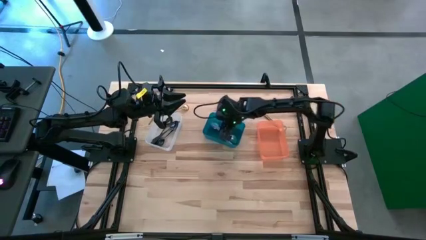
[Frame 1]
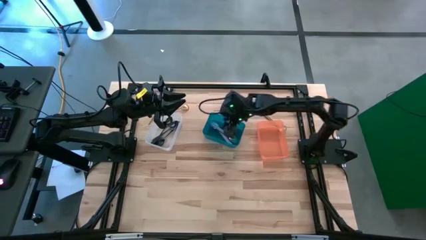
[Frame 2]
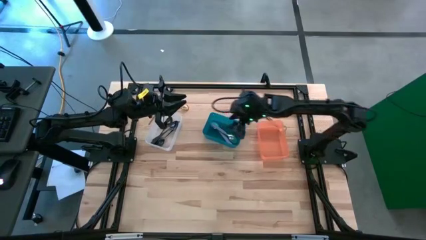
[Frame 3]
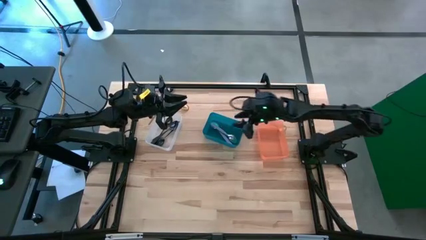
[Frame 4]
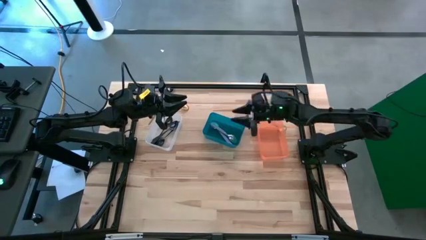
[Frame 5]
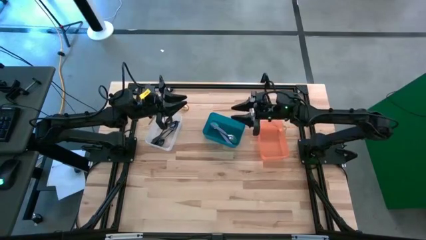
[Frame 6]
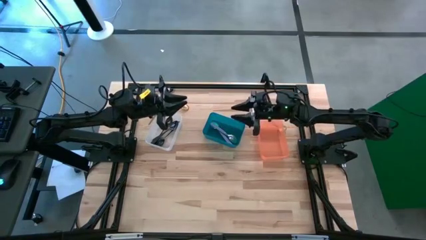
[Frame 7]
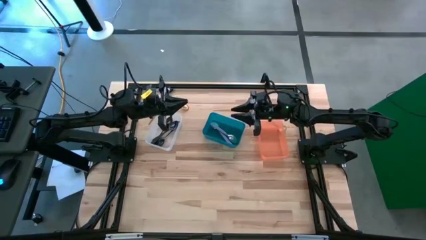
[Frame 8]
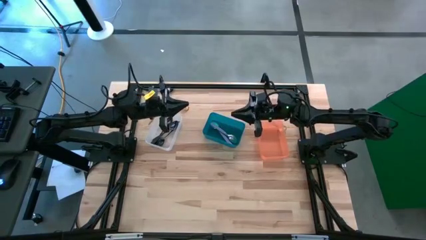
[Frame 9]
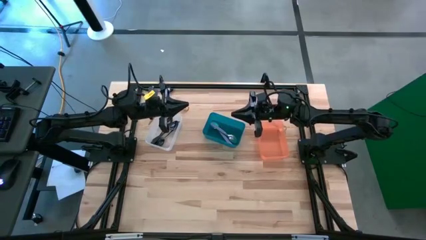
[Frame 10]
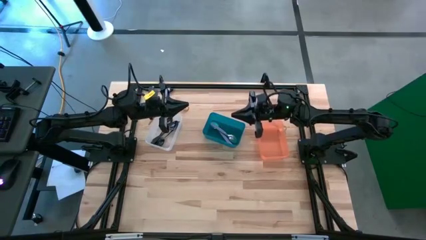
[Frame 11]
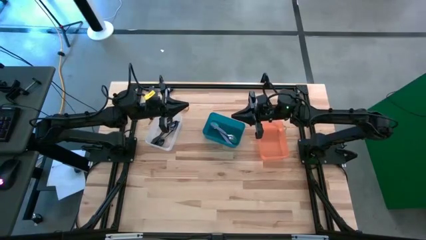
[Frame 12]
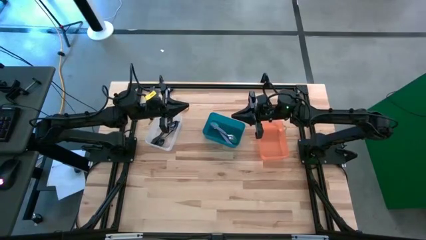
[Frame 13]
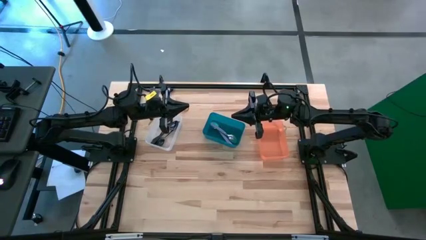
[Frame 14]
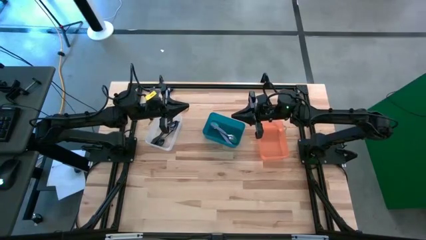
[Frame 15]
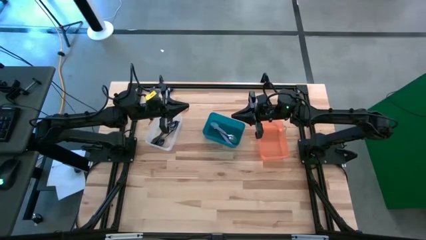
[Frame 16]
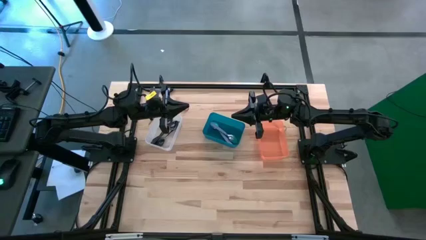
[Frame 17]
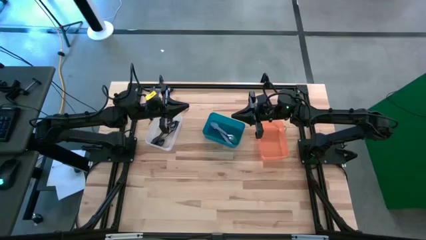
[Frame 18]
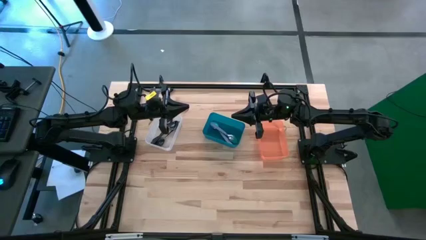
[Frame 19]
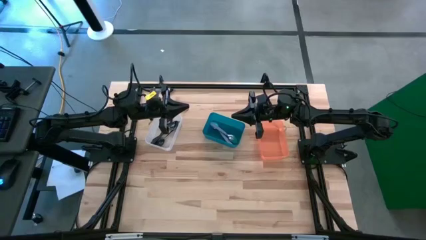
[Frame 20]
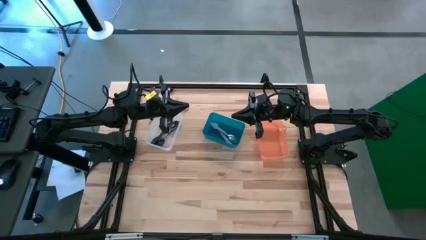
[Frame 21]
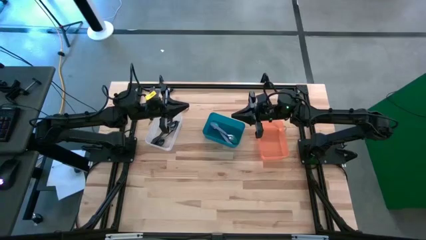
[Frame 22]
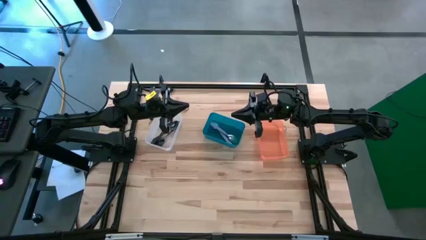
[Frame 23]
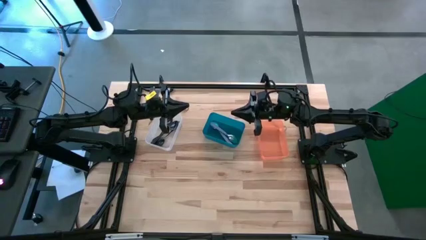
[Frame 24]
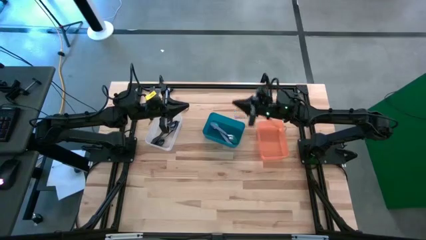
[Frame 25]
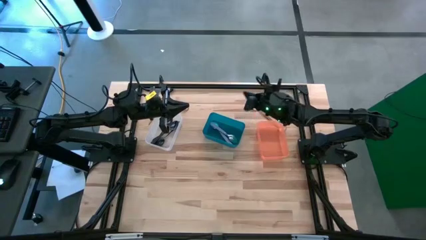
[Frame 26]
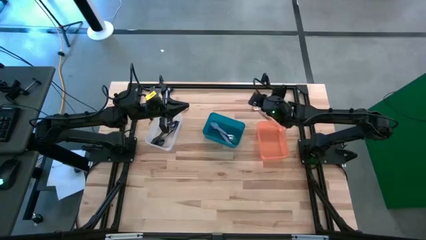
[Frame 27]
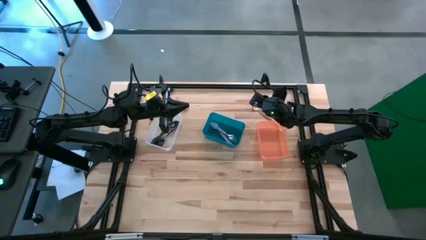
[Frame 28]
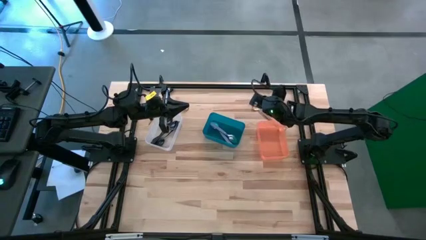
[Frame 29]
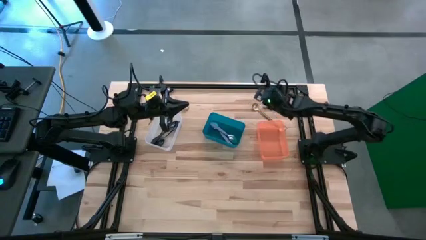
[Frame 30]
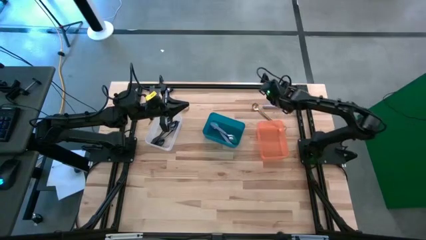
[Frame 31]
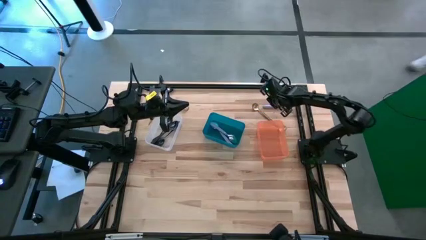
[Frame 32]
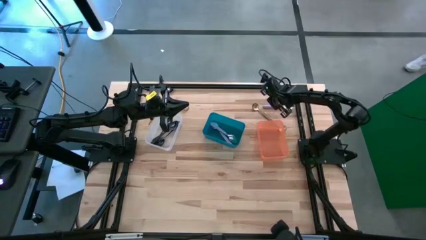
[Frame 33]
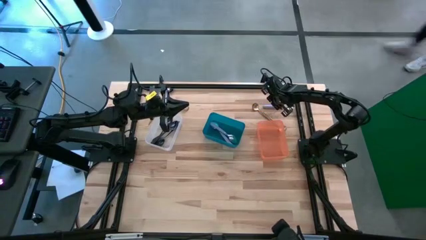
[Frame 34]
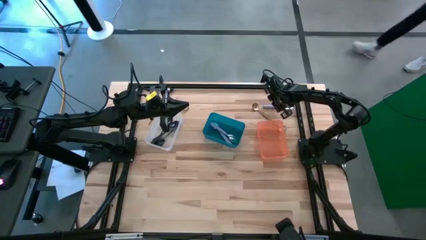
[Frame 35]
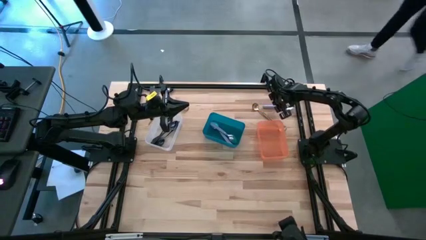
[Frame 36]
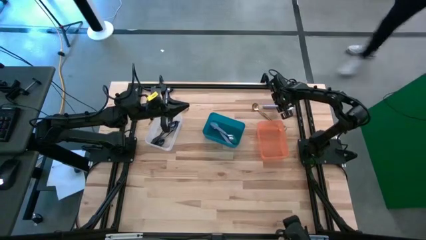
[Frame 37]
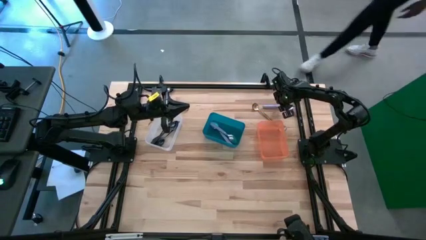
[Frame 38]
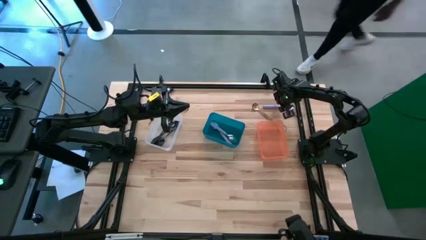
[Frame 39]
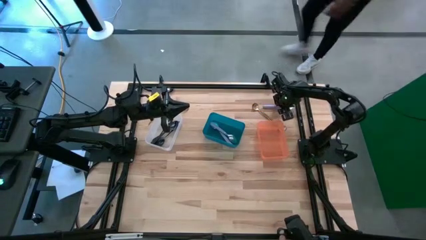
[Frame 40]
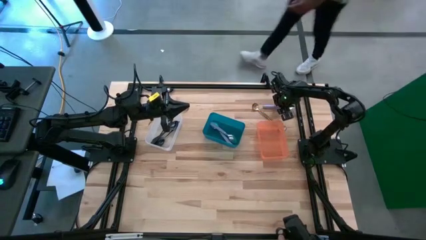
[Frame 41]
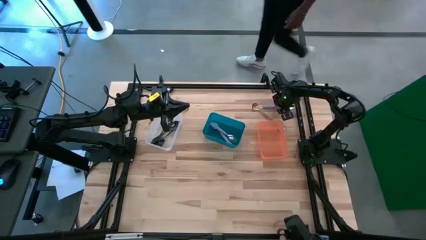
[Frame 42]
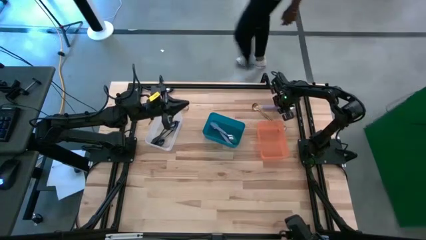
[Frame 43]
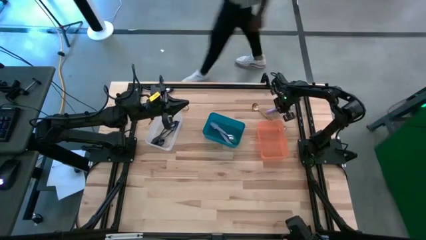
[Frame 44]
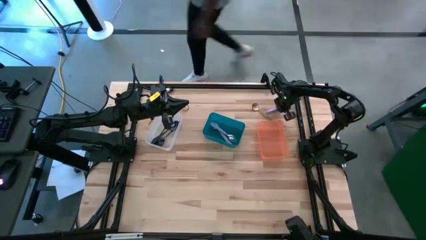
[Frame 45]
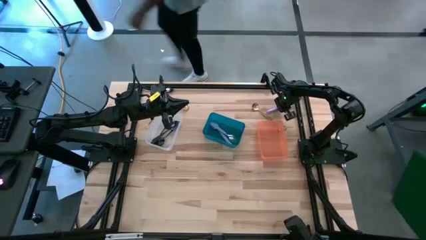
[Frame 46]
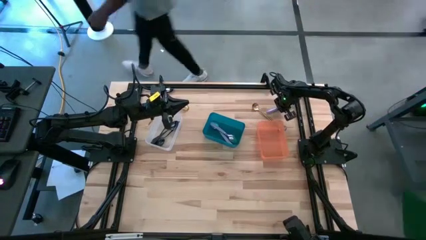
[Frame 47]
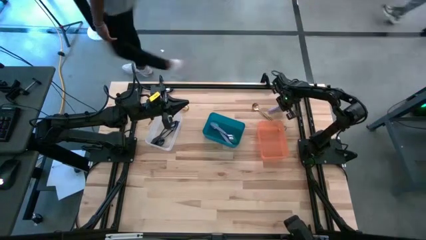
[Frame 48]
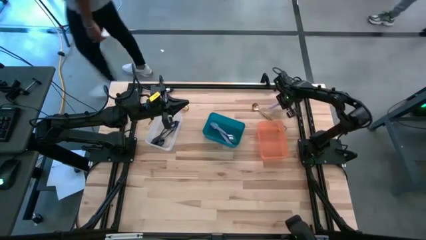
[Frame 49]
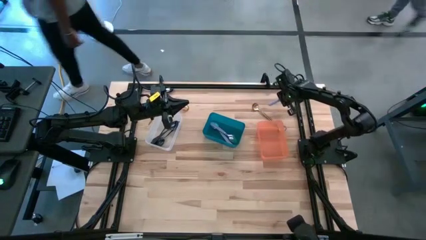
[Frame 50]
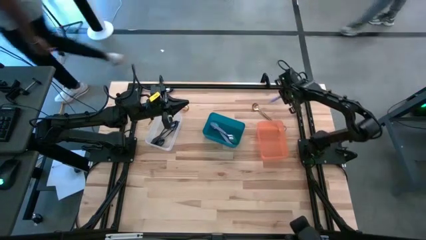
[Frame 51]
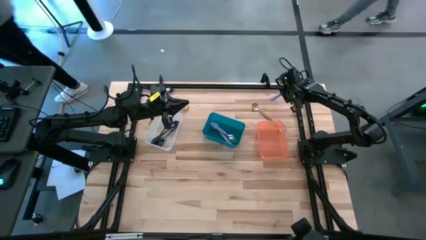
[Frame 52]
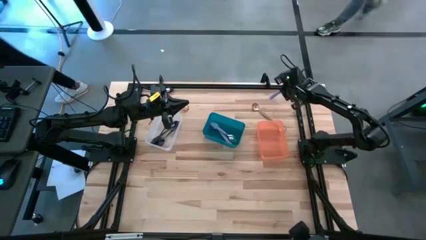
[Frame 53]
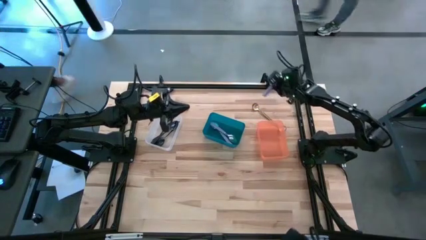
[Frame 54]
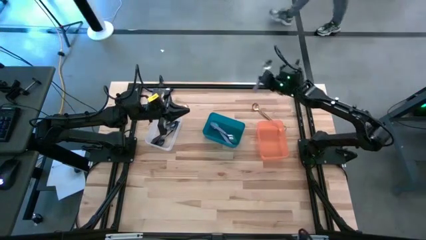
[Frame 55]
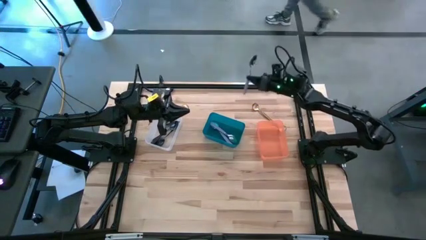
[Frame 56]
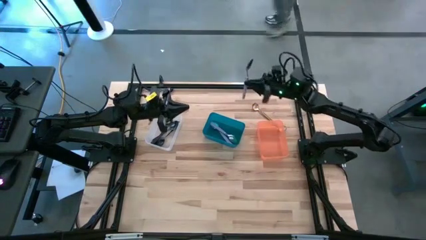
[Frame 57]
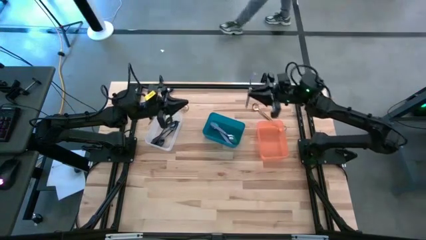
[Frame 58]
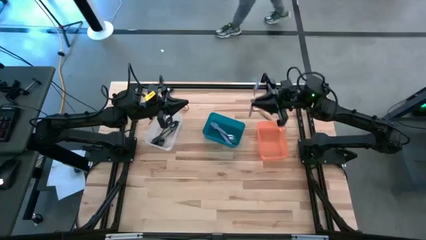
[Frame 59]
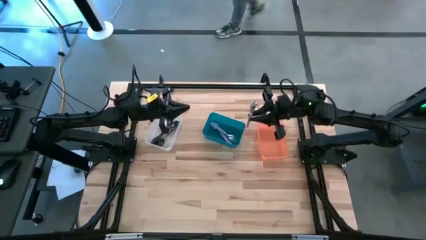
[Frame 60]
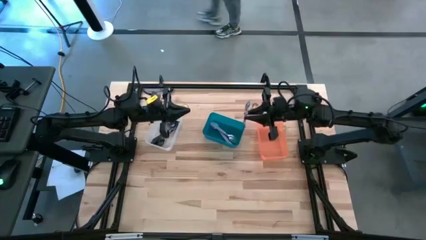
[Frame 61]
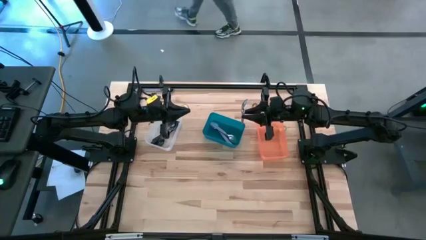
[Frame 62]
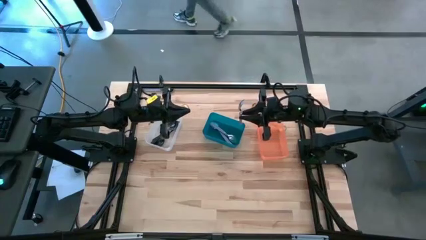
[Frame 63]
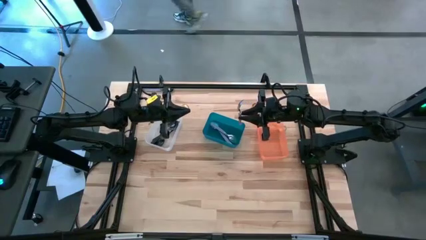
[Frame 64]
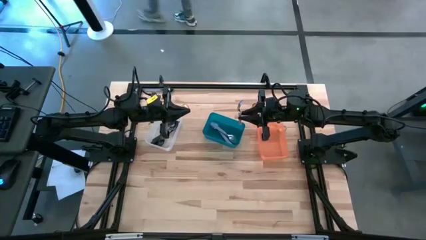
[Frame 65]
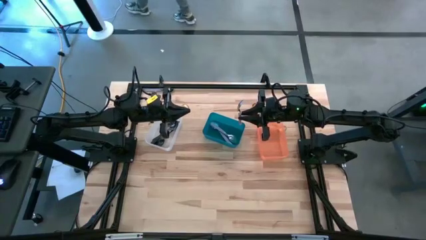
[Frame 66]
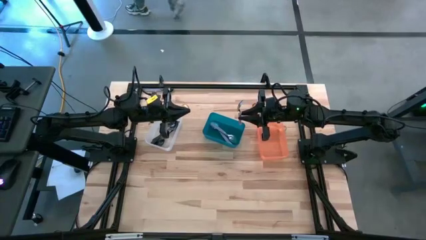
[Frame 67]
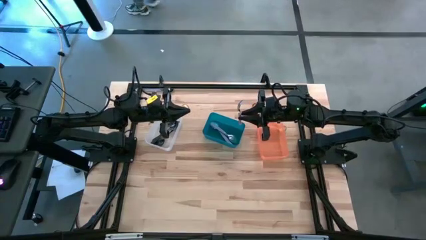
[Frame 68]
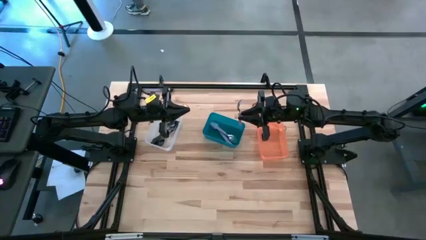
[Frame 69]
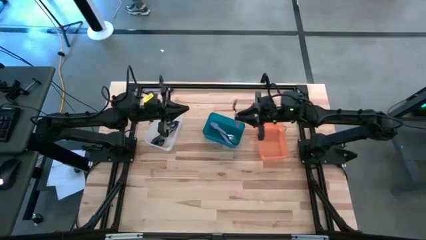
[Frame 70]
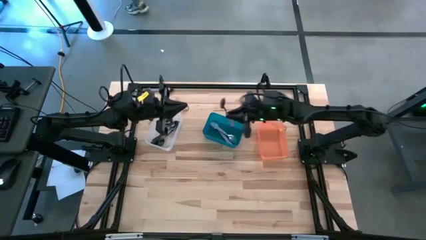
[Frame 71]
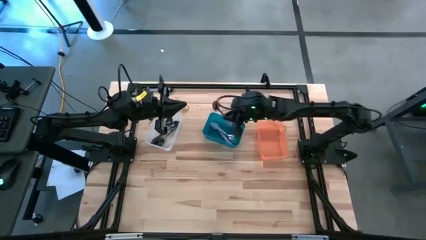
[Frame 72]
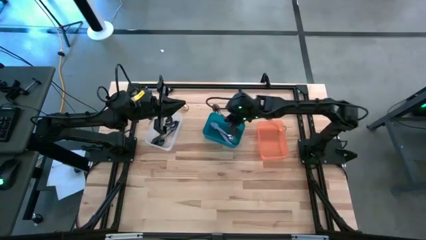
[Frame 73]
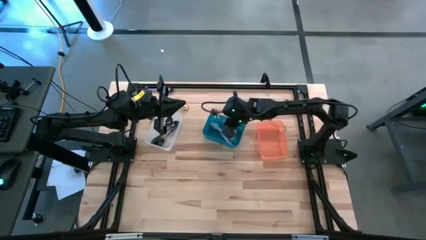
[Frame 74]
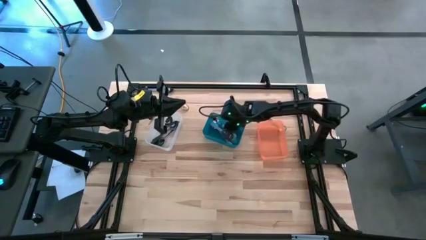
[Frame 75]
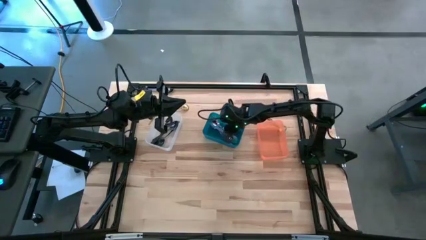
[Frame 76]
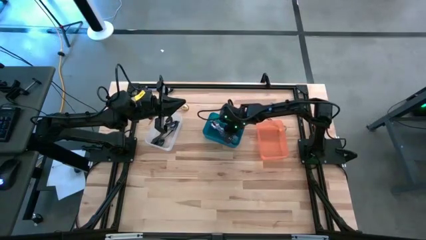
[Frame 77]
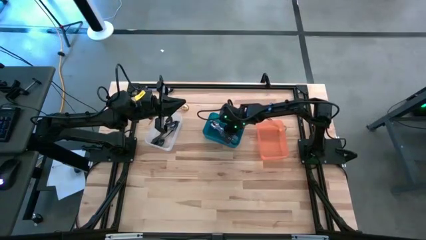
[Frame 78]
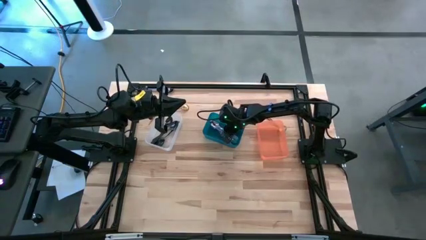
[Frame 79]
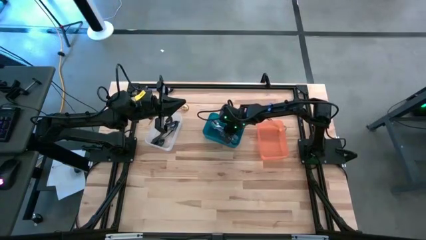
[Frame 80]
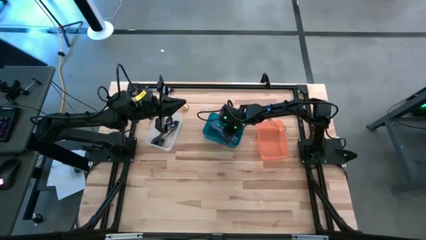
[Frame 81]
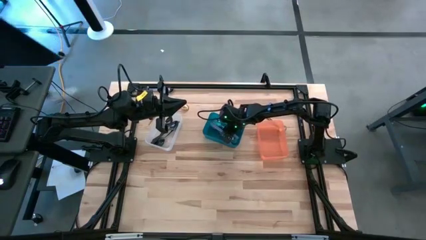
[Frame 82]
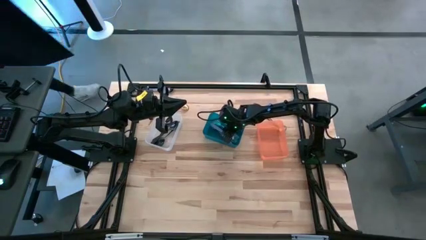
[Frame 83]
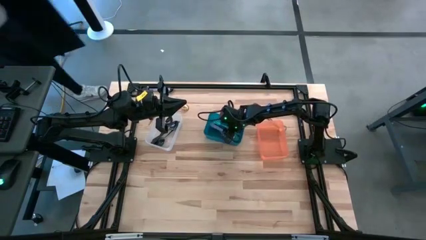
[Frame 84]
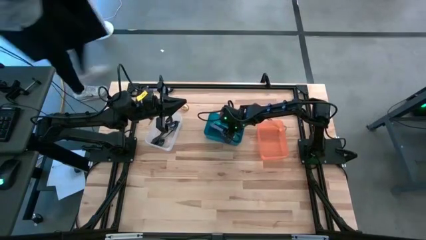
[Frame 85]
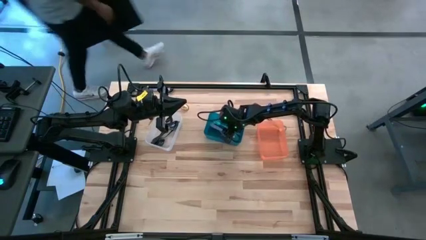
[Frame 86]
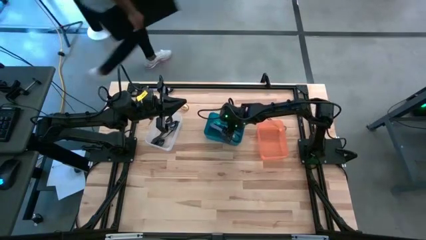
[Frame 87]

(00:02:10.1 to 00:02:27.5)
Task: Sort silverware by color (type)
Put the purple spoon into the blue bin
